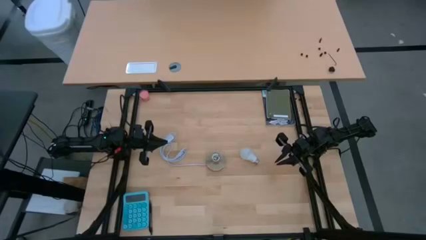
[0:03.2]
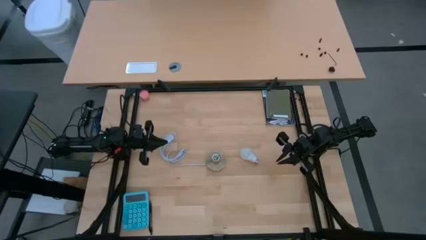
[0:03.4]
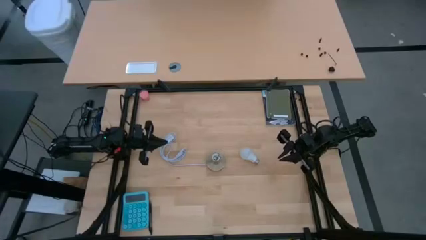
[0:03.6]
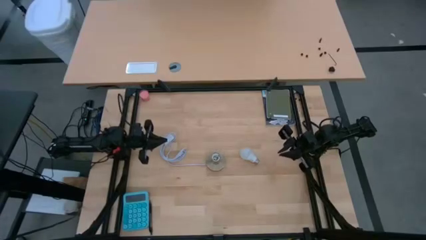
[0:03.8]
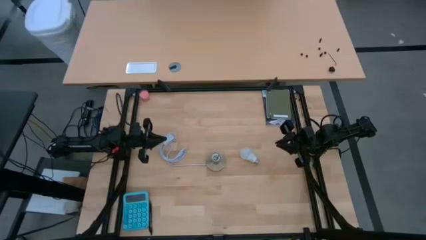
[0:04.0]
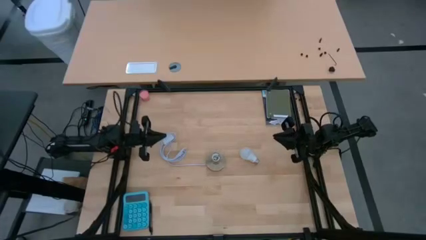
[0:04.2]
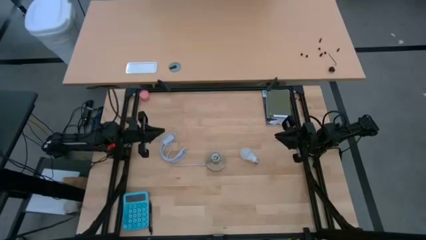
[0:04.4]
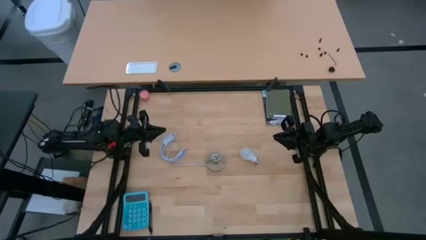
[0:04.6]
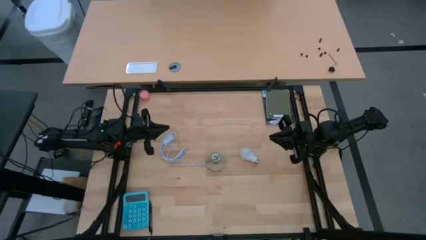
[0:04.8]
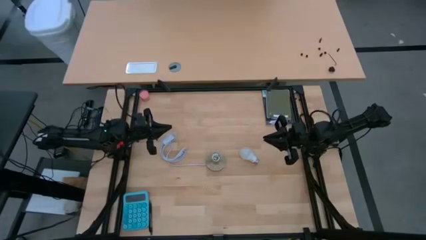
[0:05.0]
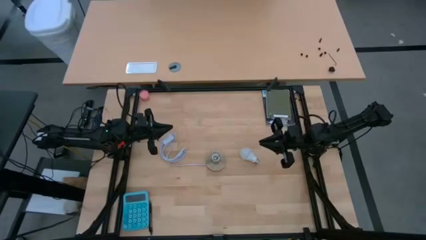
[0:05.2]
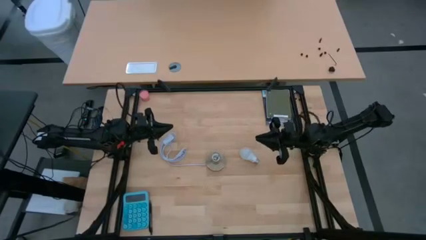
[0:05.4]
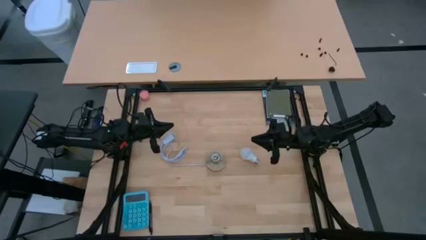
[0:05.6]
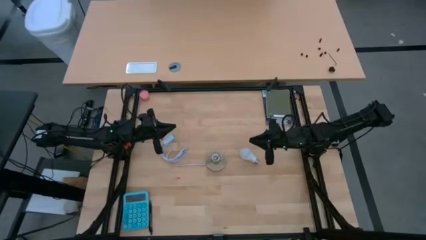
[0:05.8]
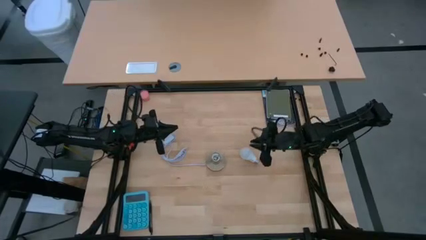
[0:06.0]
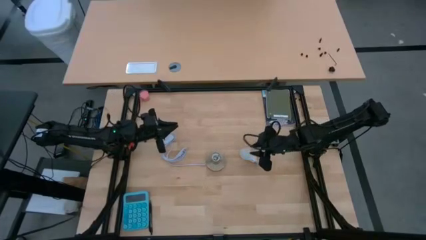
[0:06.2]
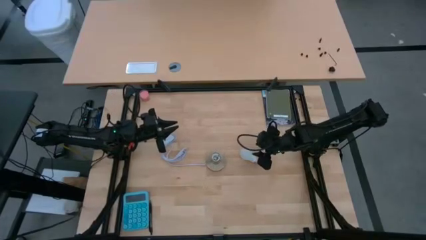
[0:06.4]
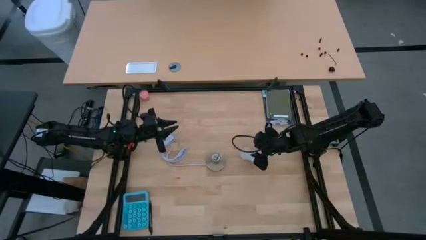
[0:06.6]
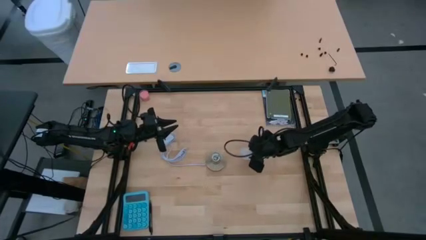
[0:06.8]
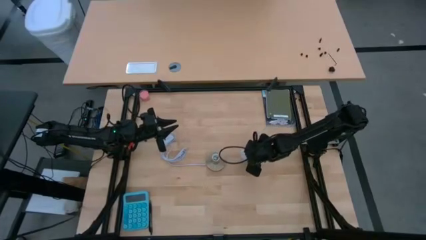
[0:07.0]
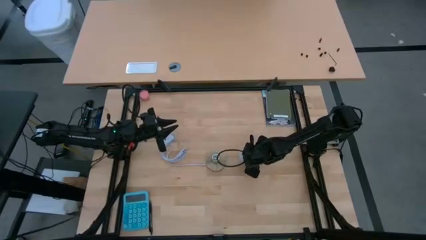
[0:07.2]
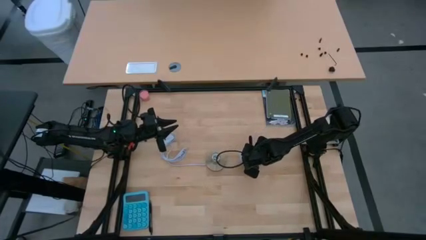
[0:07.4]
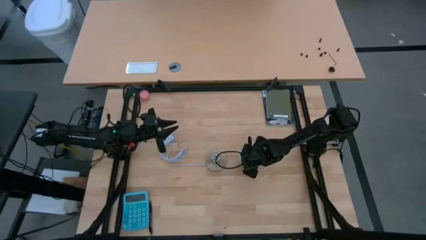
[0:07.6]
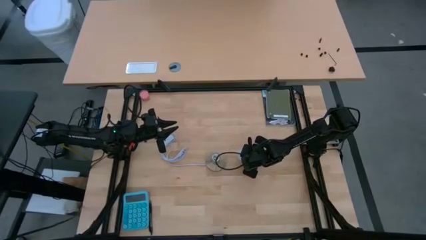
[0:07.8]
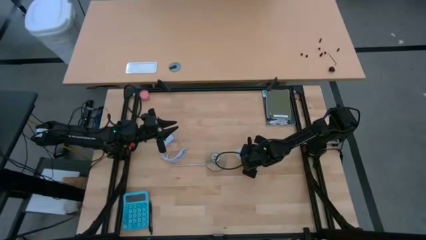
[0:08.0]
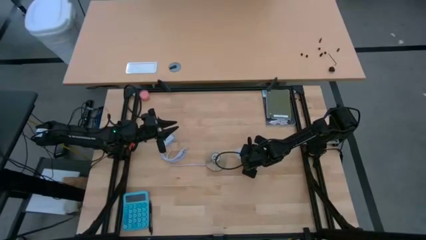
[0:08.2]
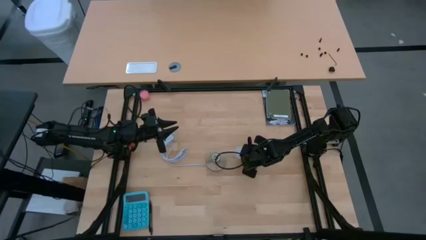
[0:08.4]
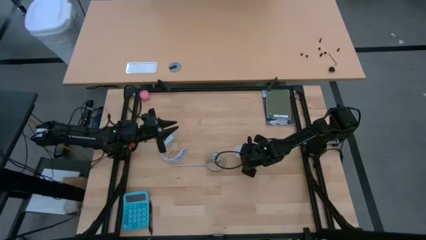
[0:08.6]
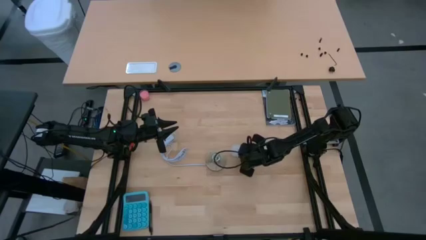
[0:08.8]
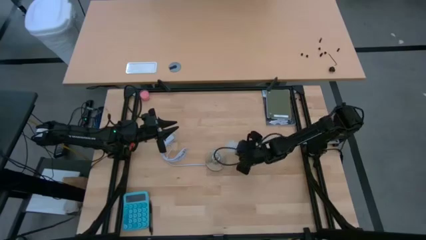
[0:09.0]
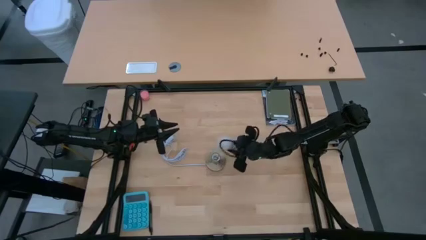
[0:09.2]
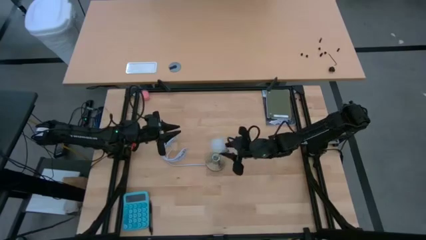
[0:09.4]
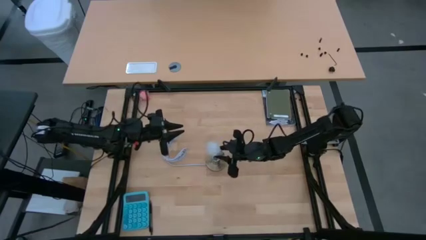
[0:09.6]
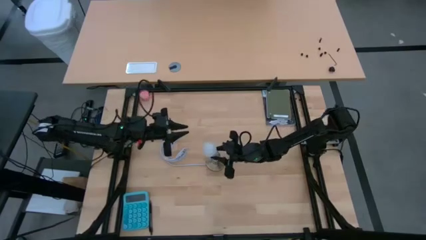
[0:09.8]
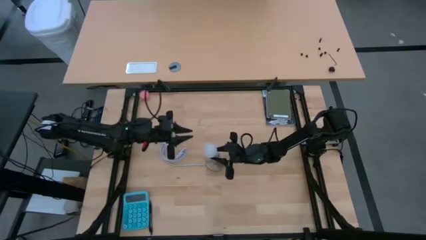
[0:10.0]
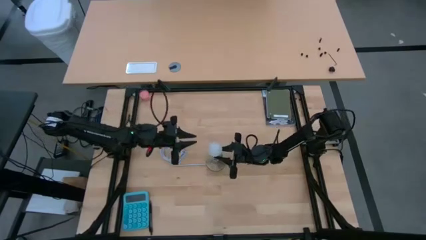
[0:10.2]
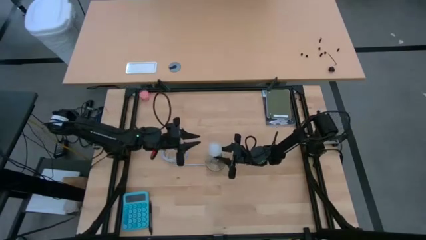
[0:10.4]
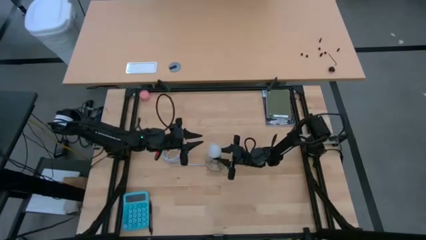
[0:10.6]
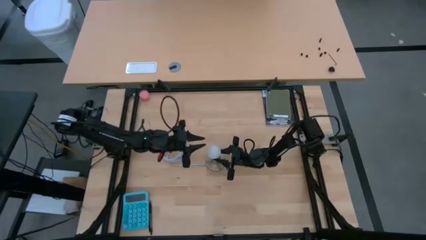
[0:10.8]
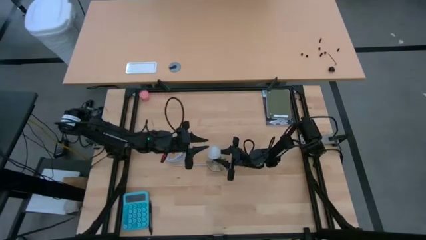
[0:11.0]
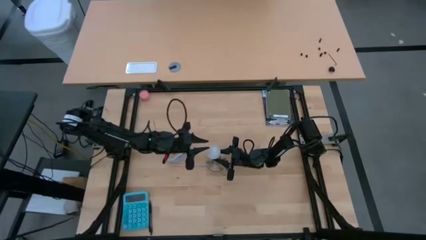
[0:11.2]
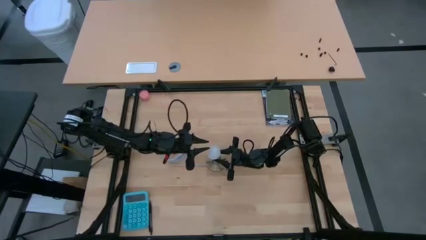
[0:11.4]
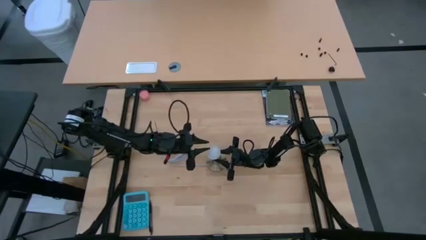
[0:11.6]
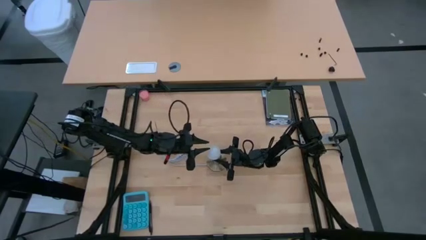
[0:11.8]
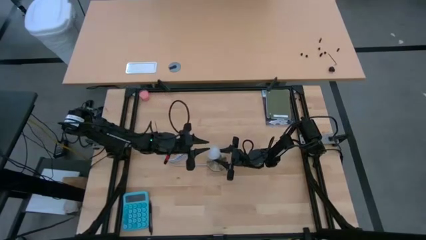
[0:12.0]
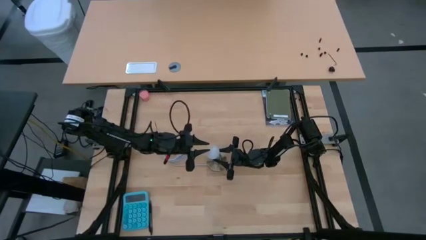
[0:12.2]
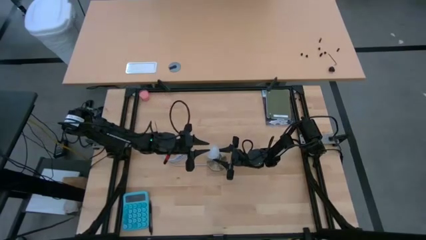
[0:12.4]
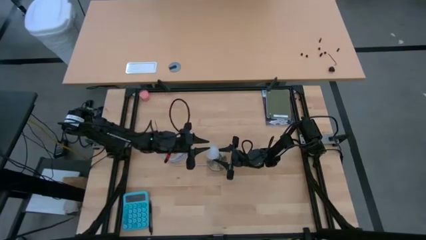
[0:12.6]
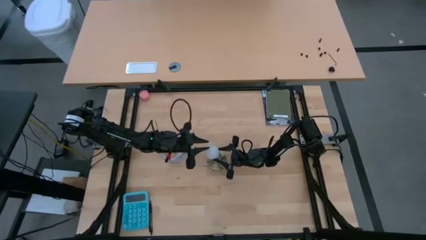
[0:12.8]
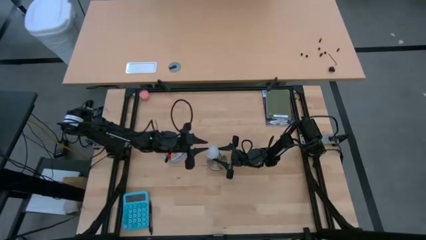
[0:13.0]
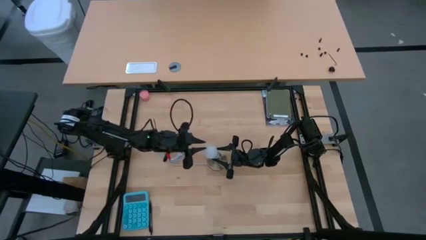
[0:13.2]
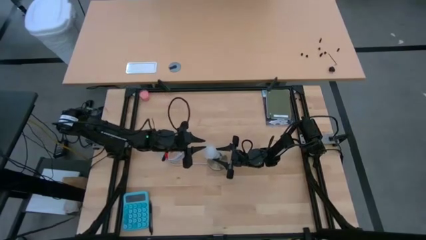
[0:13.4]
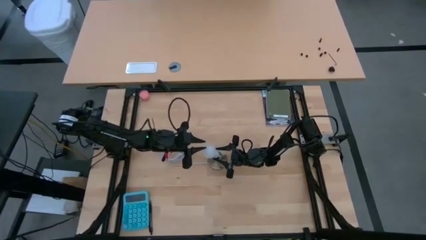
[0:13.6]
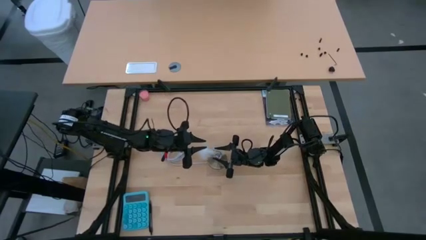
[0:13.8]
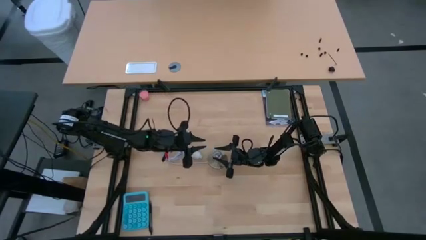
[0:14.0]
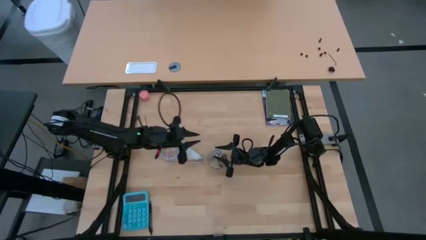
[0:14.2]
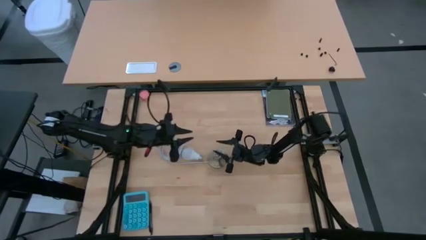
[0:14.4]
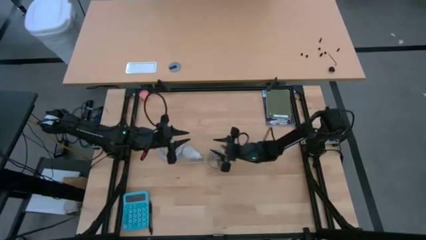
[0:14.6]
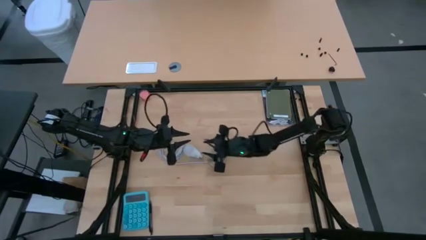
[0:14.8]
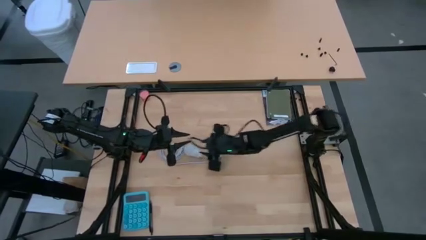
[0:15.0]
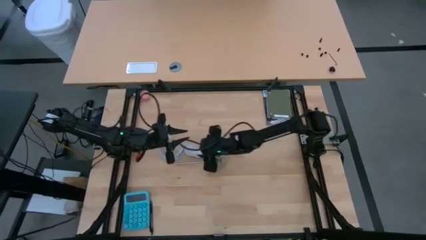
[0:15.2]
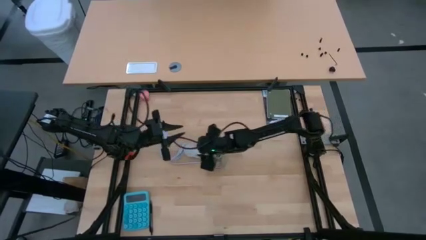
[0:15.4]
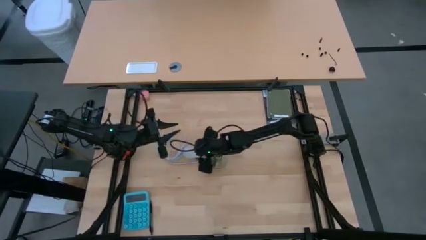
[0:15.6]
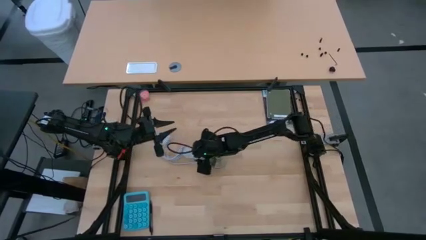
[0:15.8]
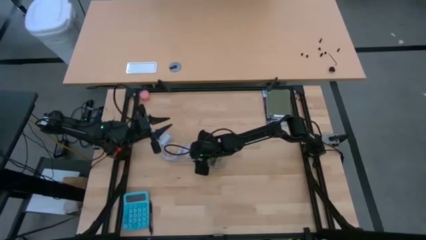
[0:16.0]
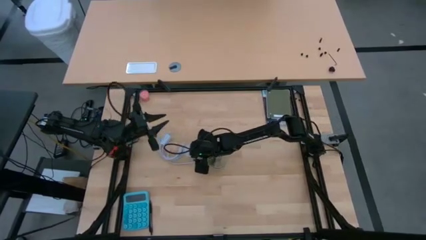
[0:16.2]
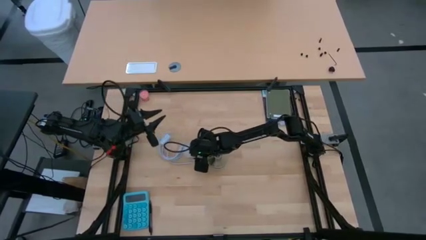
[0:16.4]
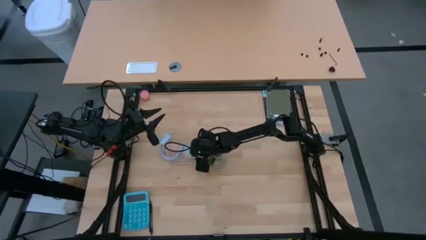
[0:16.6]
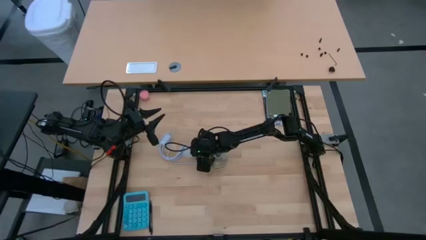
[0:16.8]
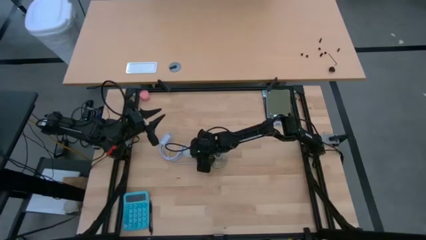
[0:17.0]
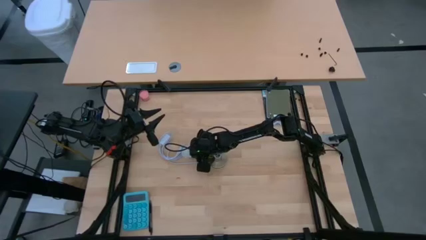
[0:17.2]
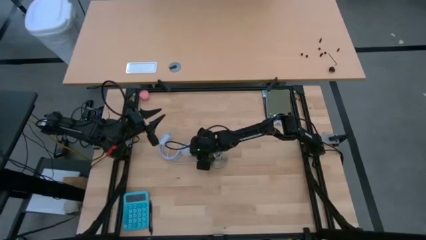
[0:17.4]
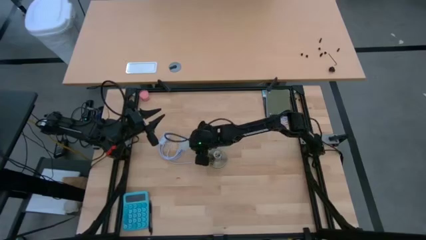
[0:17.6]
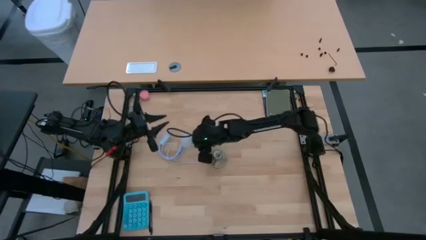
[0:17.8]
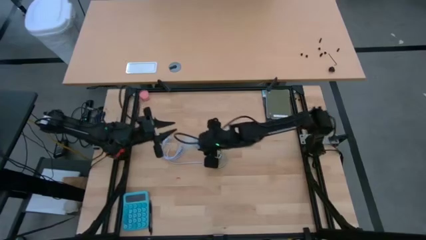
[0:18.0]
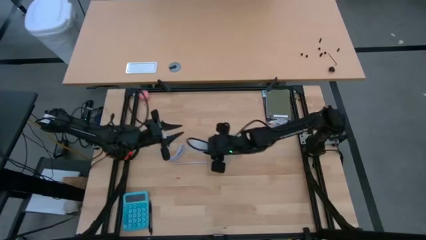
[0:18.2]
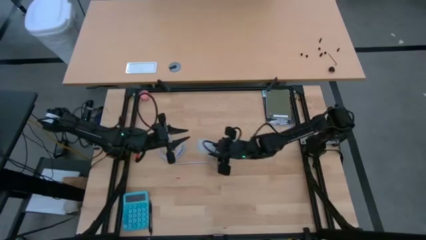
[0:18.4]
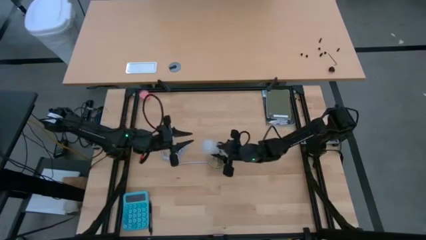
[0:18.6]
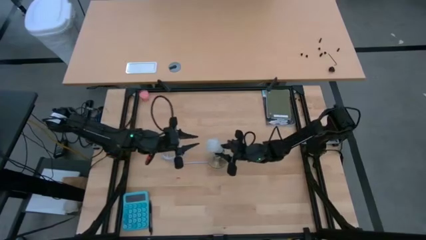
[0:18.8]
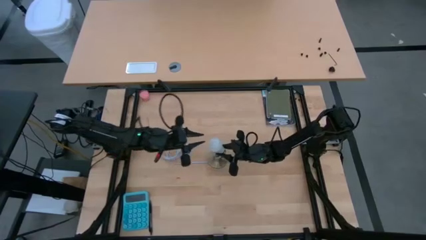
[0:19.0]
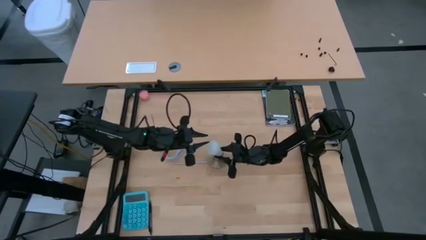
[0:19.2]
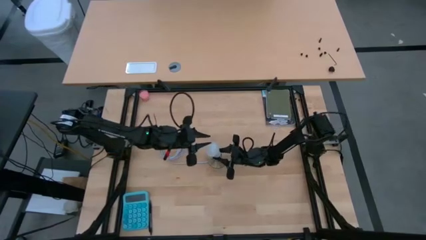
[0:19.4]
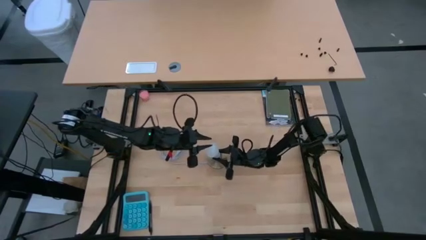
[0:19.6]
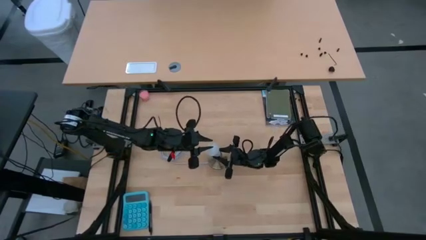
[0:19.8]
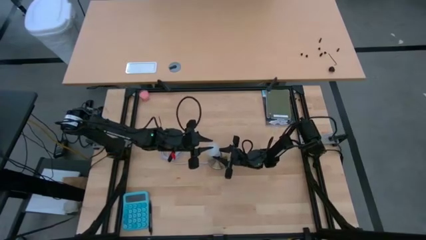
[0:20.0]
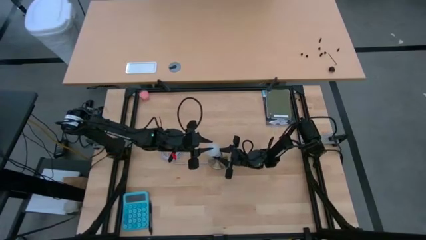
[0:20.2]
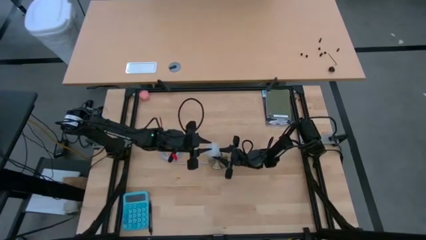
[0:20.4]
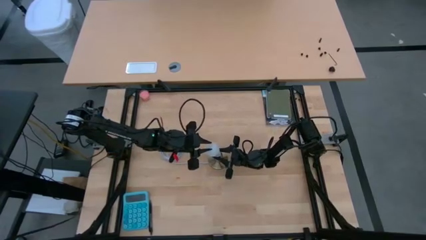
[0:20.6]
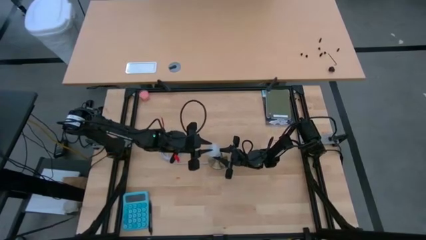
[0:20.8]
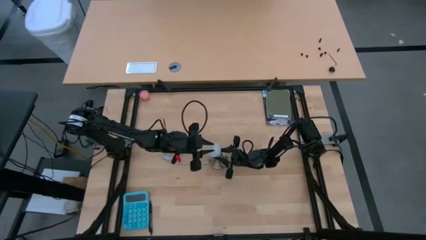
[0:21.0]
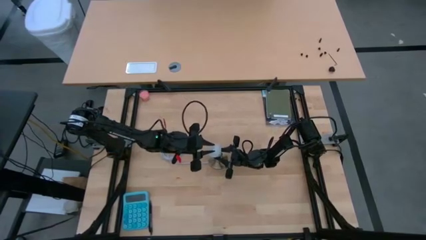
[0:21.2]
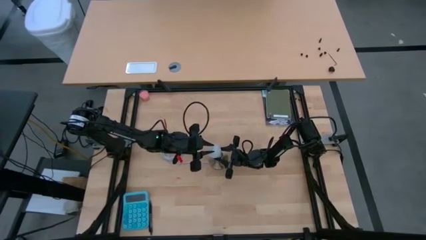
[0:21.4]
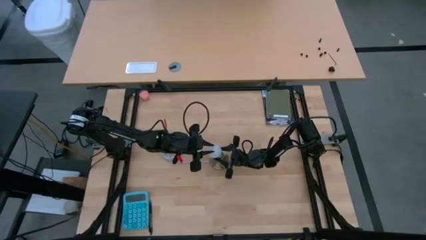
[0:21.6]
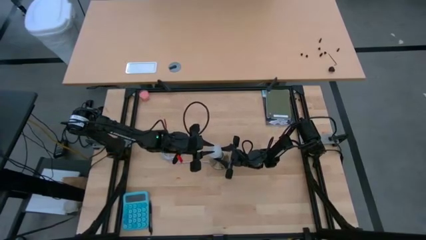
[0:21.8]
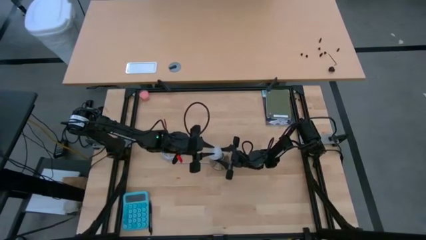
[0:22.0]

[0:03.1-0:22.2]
Task: Screw lightbulb
Insert the lightbulb into the lamp holder
